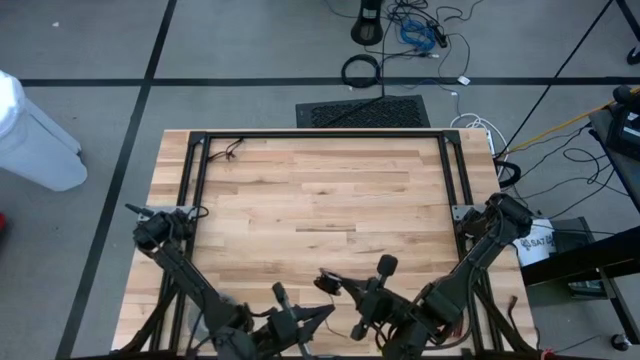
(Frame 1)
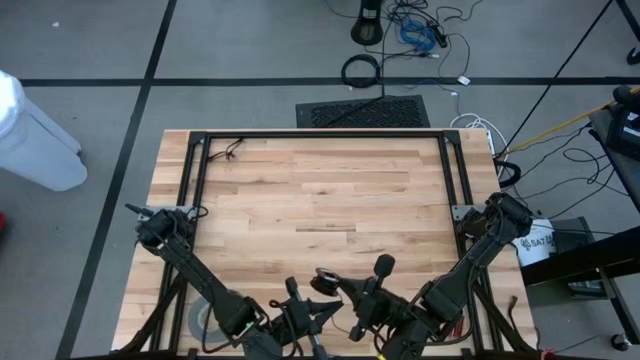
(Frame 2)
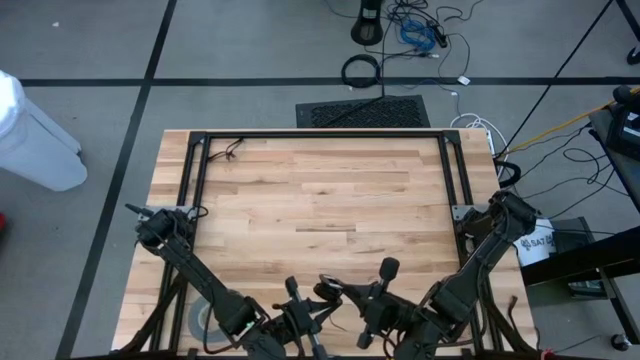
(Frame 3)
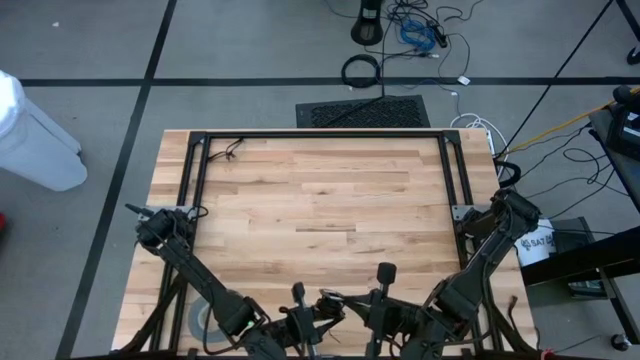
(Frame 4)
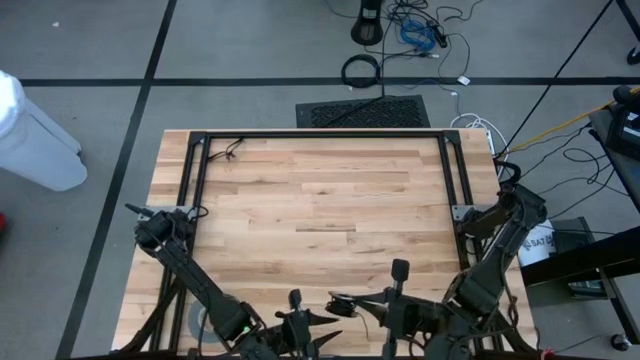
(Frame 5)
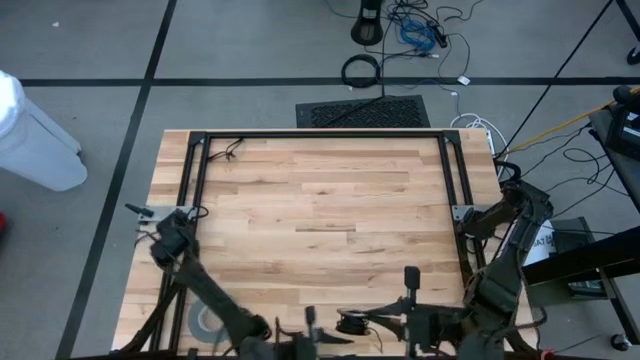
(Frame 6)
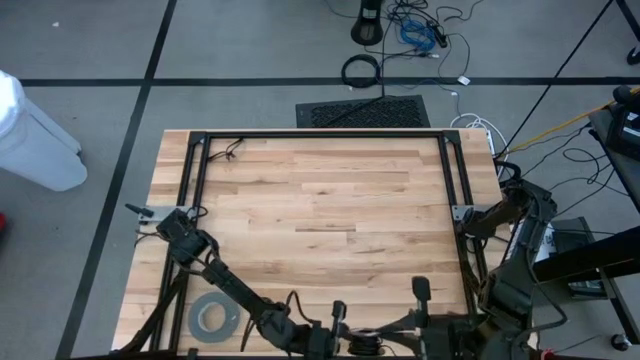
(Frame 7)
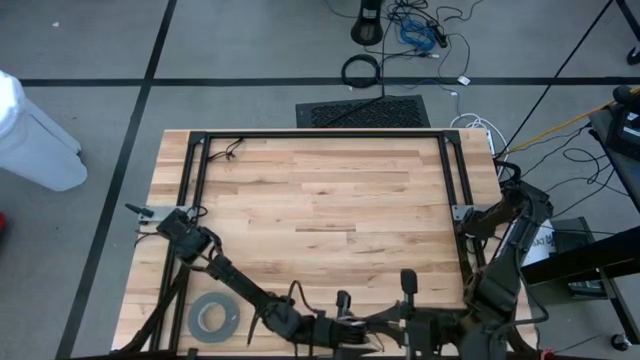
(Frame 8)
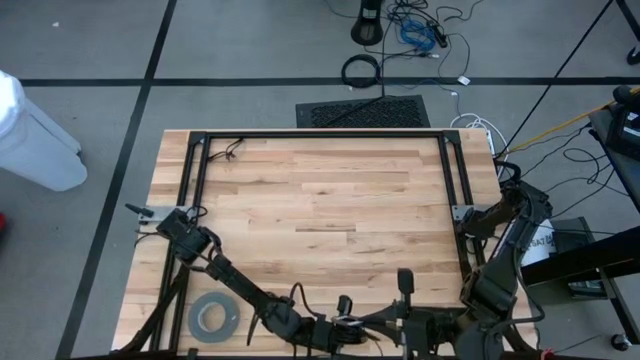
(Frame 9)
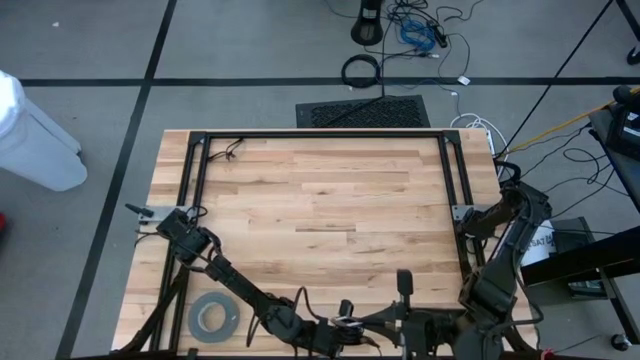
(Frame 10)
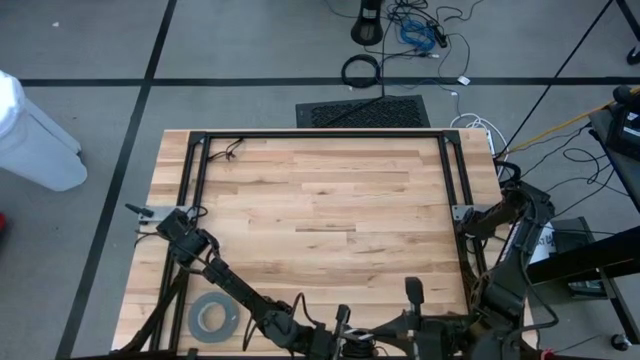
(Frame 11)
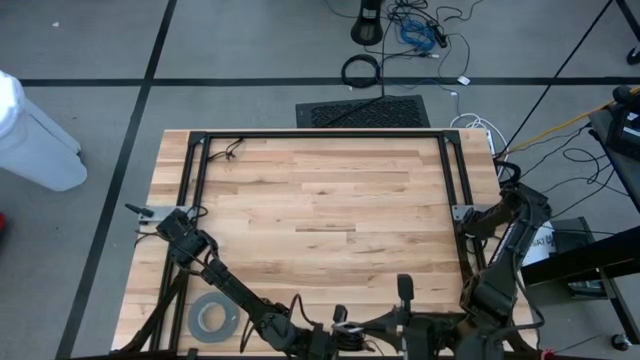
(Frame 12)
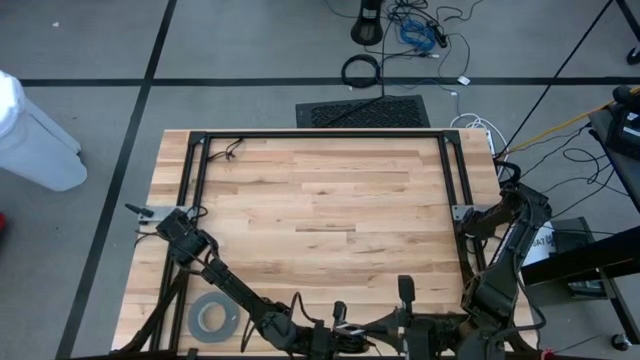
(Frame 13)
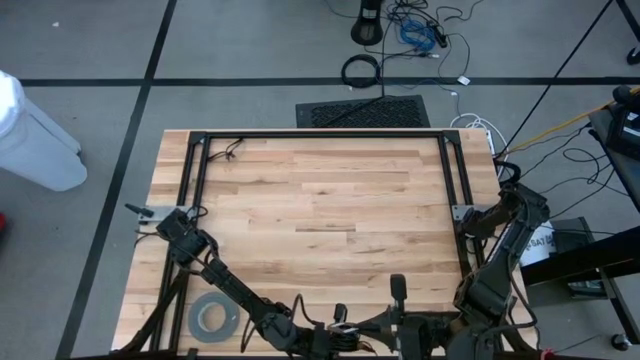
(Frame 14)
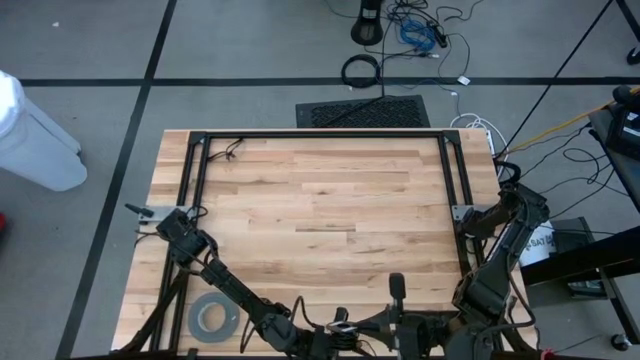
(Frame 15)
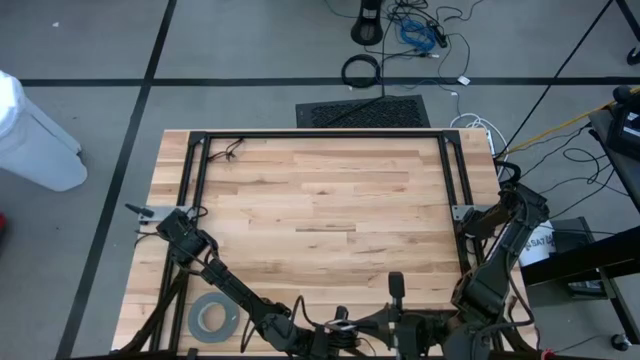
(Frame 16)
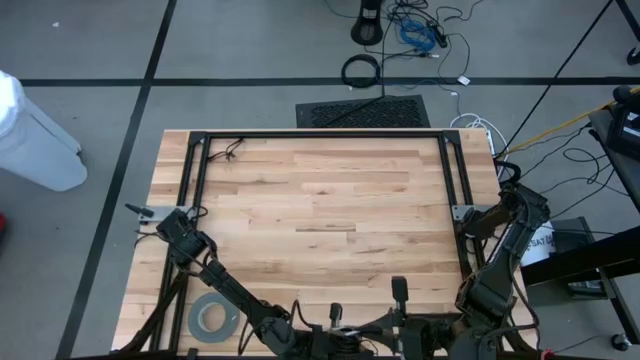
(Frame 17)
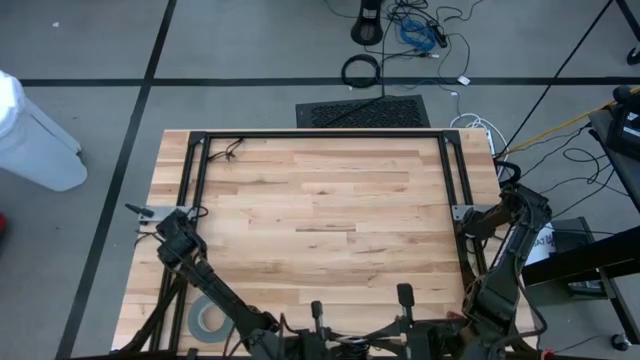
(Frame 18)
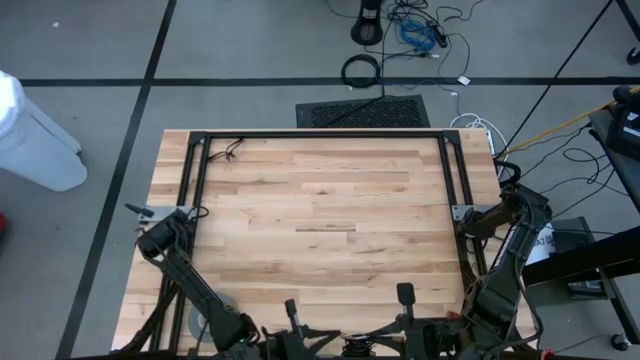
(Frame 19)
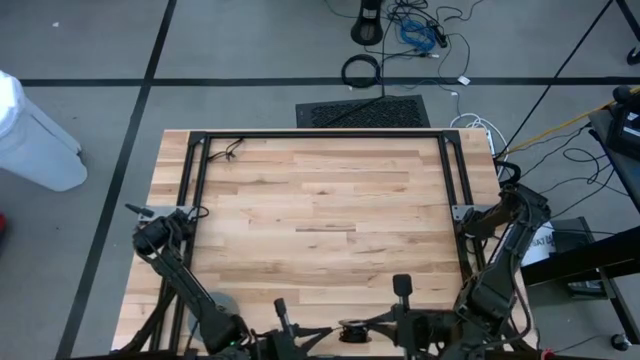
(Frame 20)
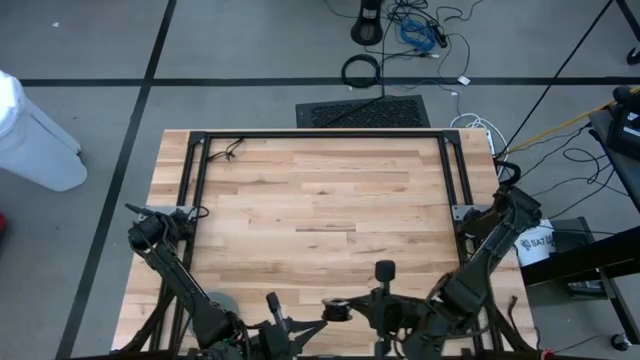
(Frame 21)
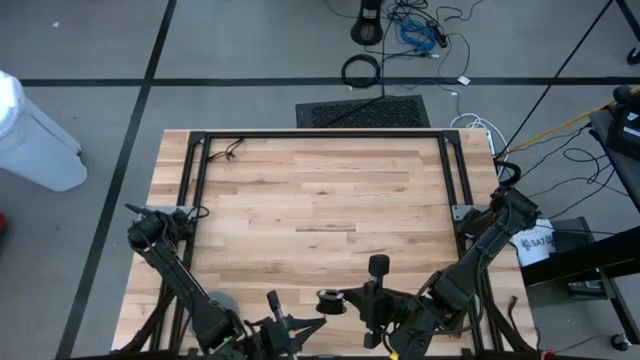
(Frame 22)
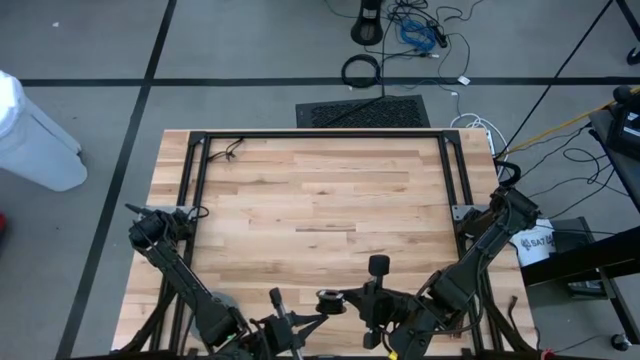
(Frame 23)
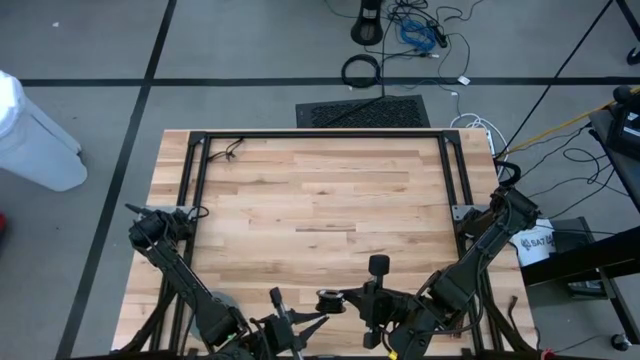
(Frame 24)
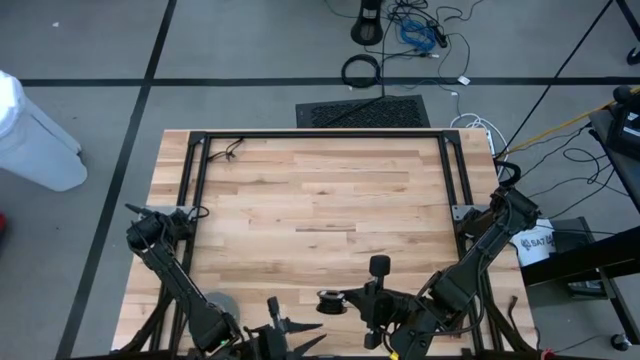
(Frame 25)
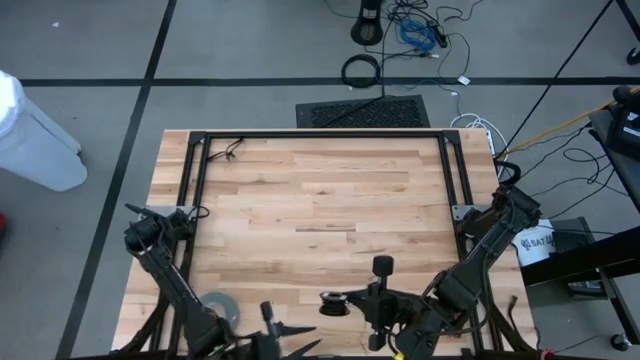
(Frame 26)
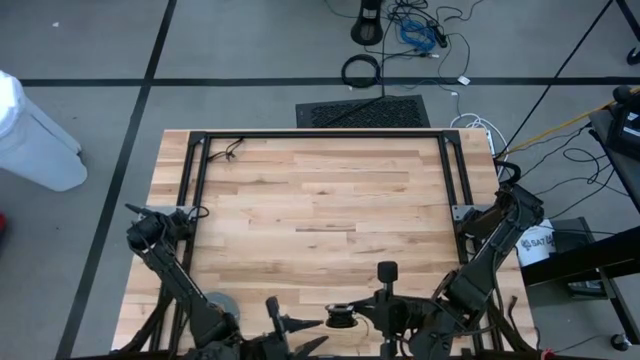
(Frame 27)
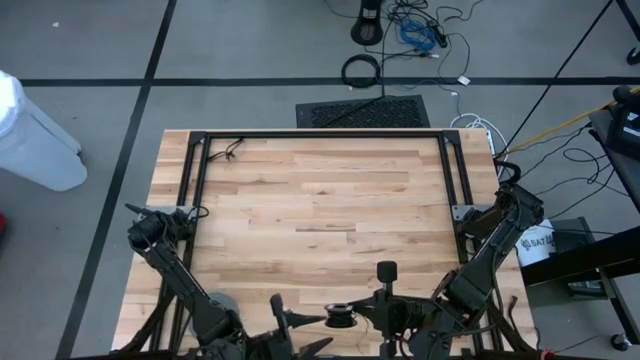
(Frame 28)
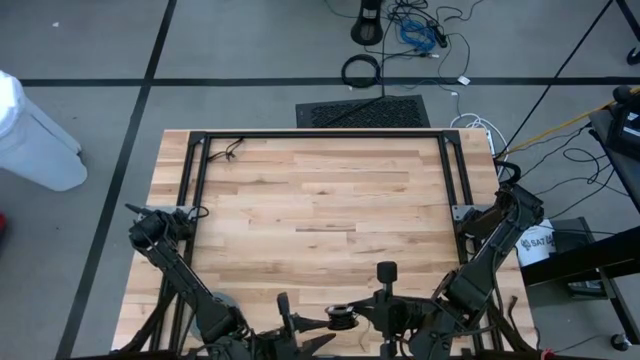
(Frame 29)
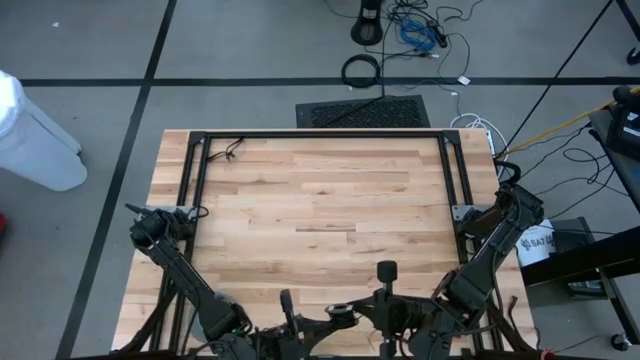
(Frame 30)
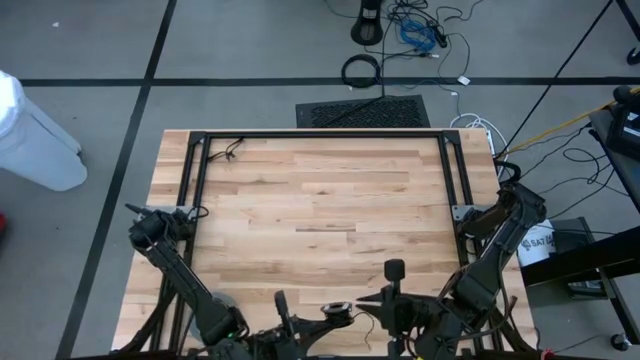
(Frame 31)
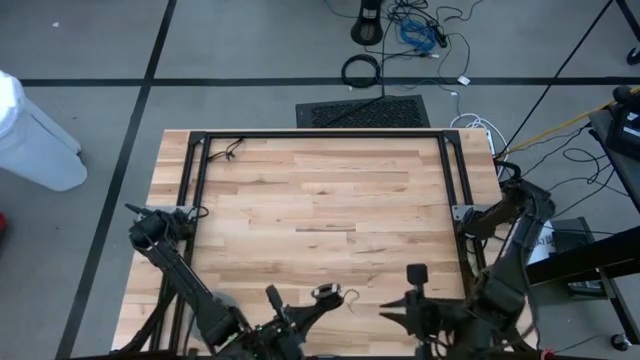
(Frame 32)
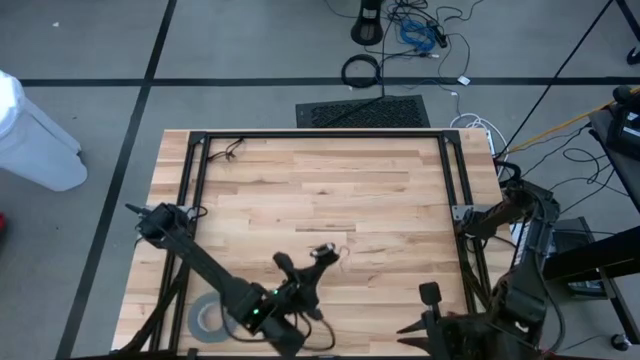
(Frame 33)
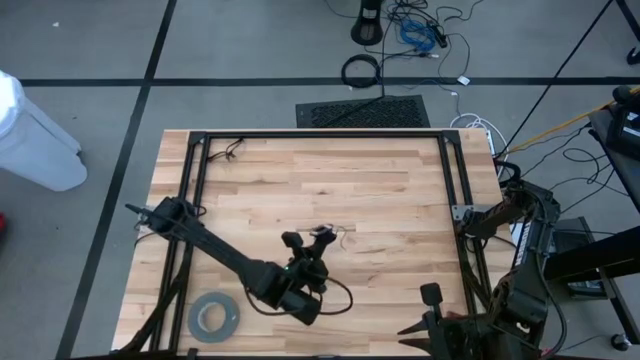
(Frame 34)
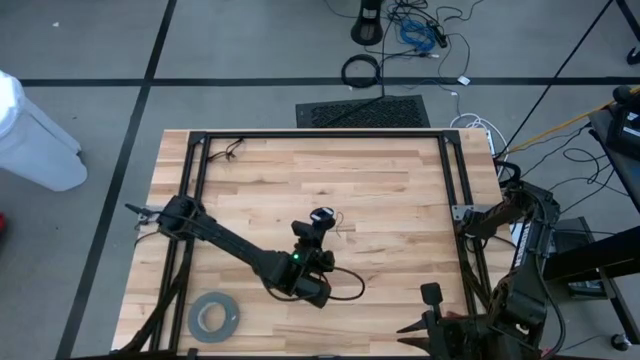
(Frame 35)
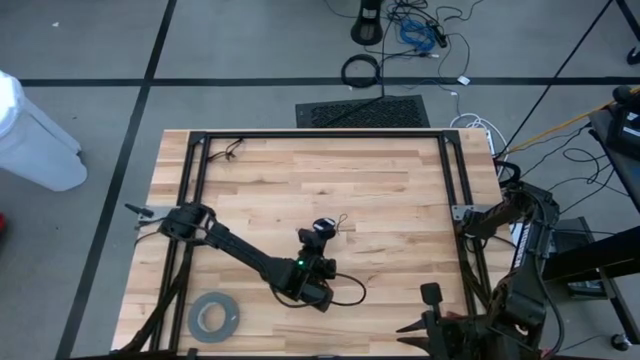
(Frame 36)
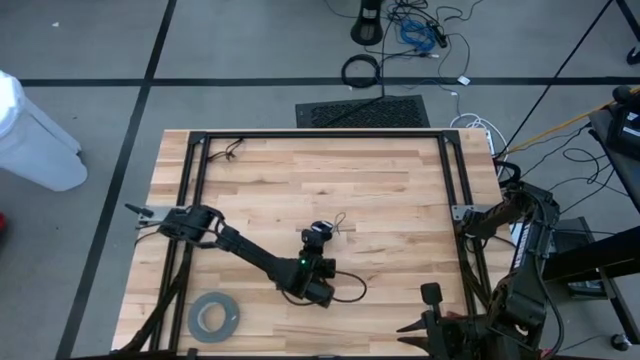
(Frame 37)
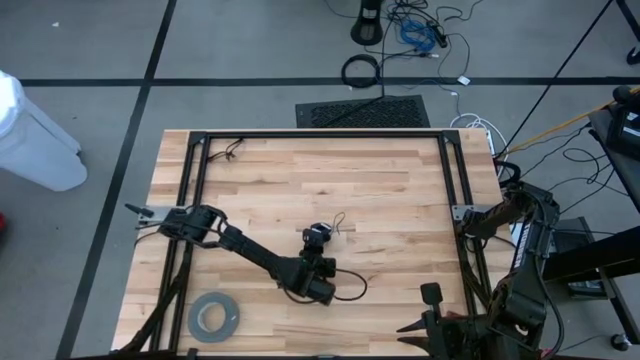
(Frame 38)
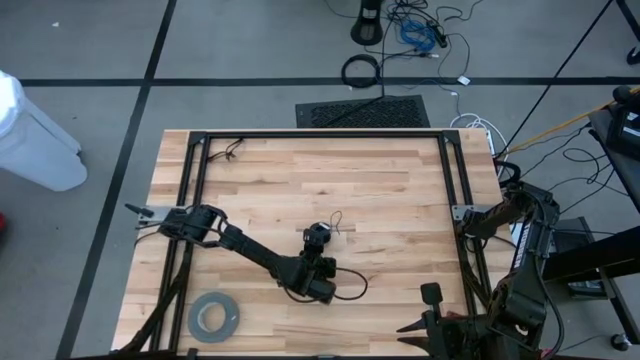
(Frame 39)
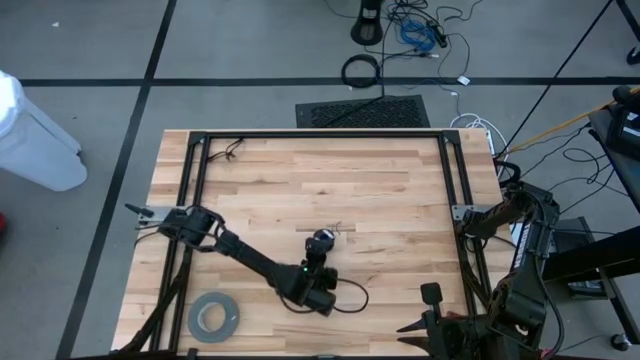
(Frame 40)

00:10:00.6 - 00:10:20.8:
Task: Coil cords
Coil the black wire onto the spool
